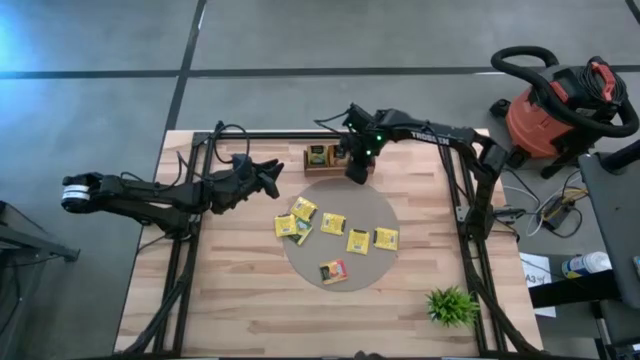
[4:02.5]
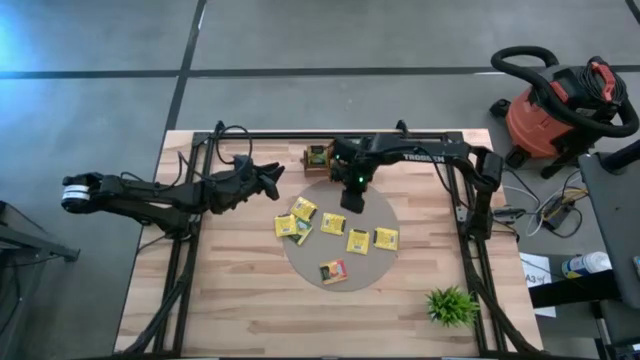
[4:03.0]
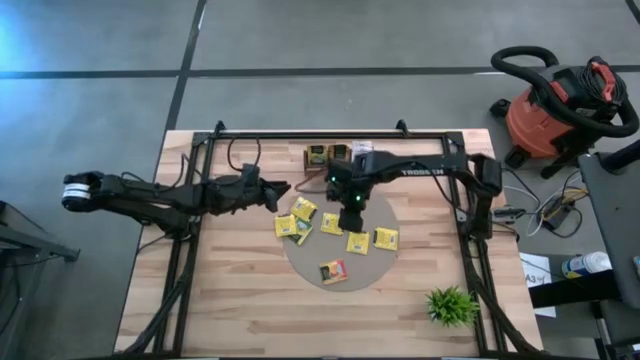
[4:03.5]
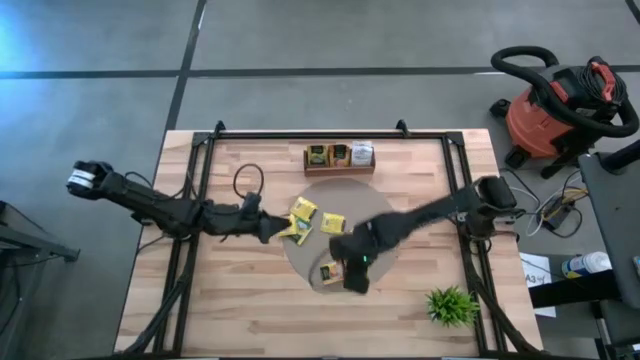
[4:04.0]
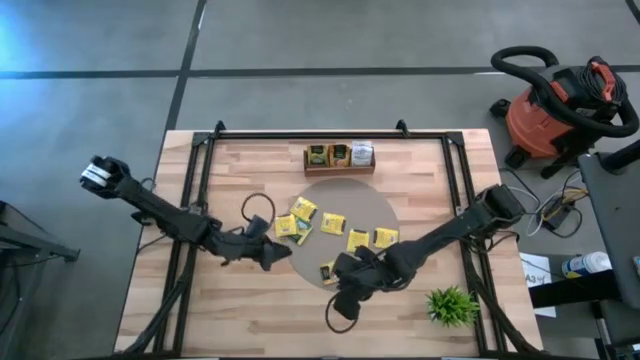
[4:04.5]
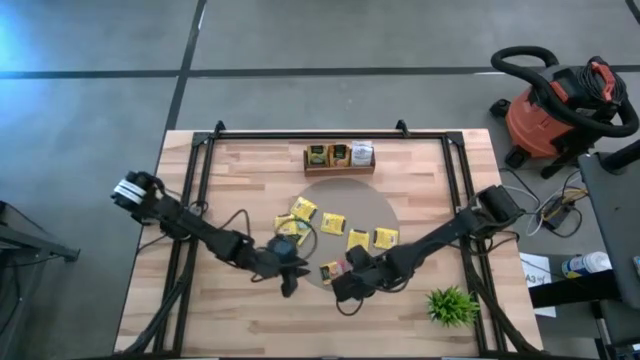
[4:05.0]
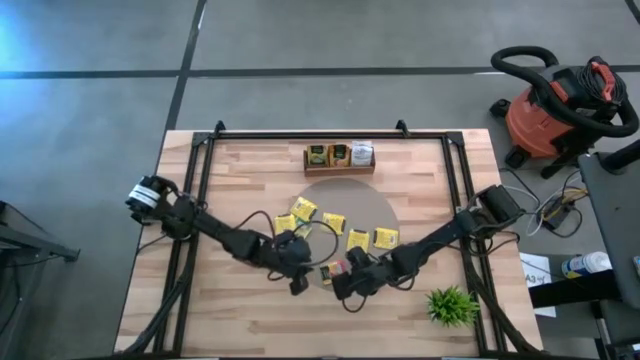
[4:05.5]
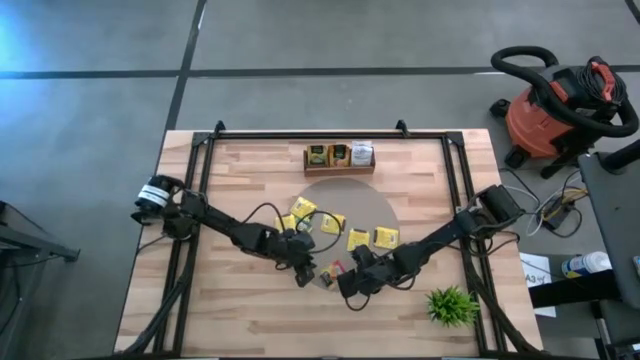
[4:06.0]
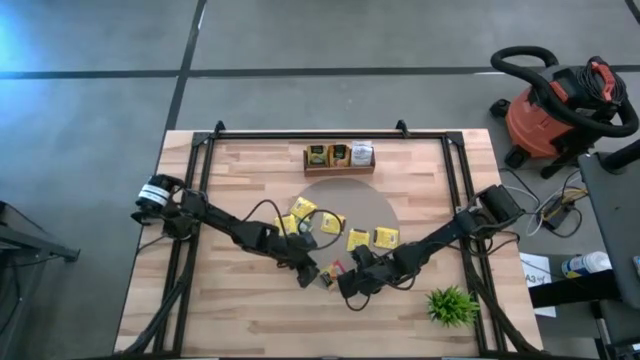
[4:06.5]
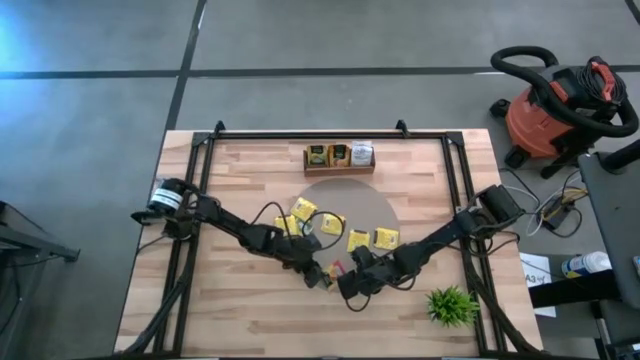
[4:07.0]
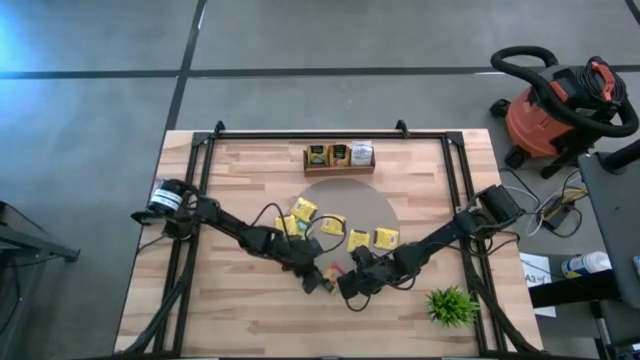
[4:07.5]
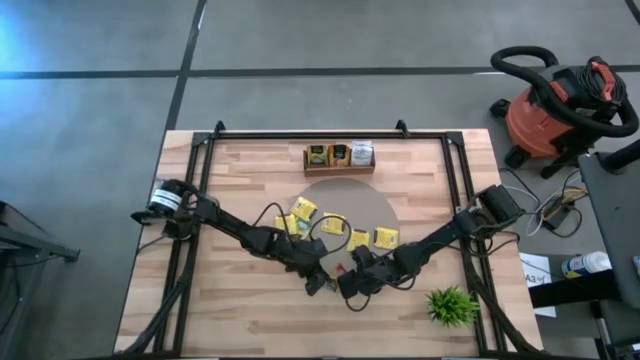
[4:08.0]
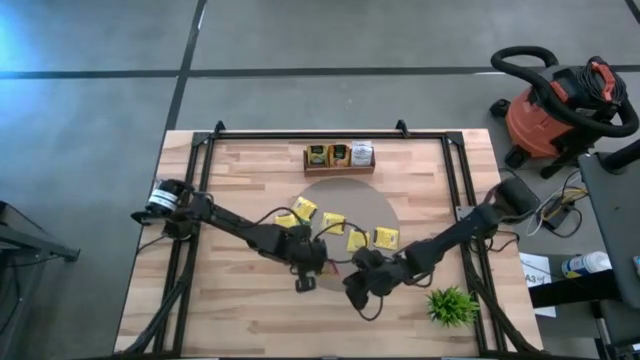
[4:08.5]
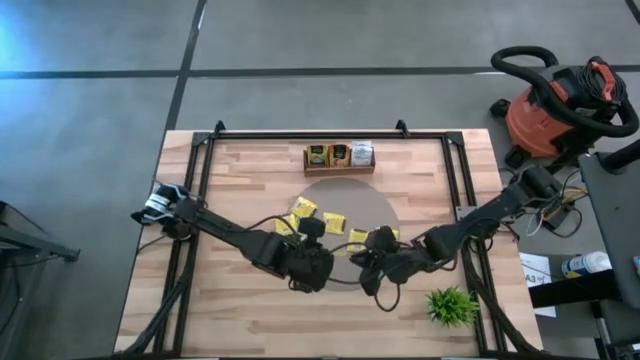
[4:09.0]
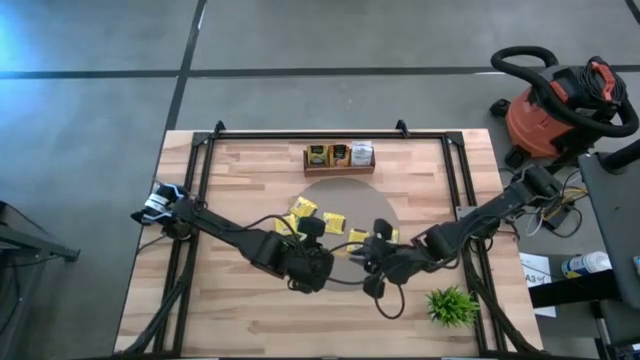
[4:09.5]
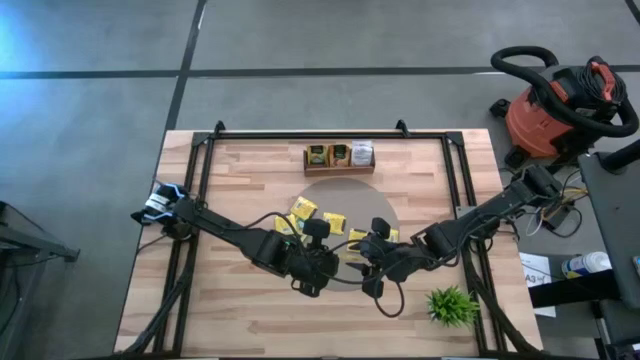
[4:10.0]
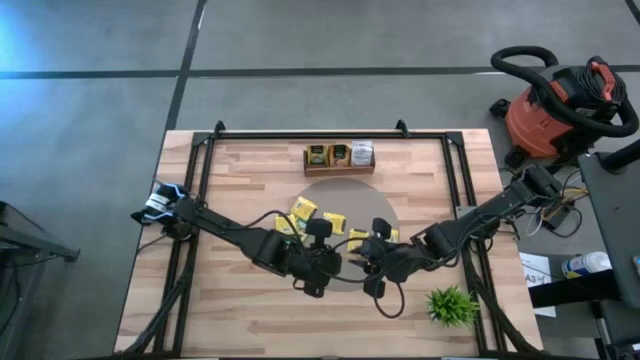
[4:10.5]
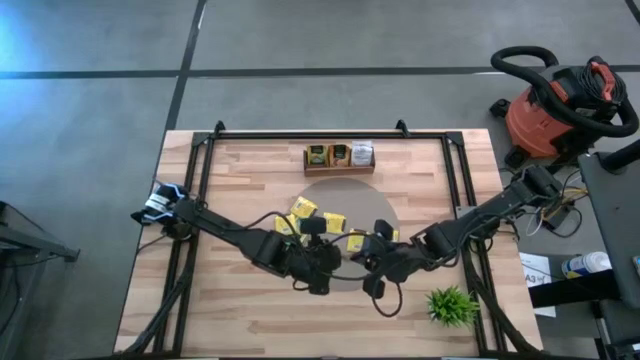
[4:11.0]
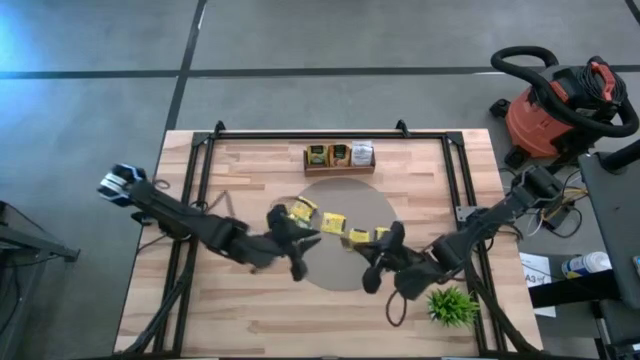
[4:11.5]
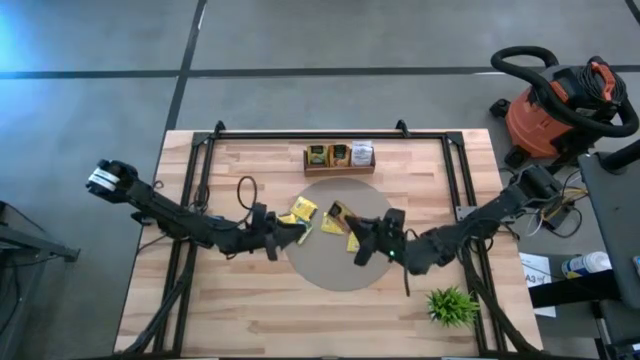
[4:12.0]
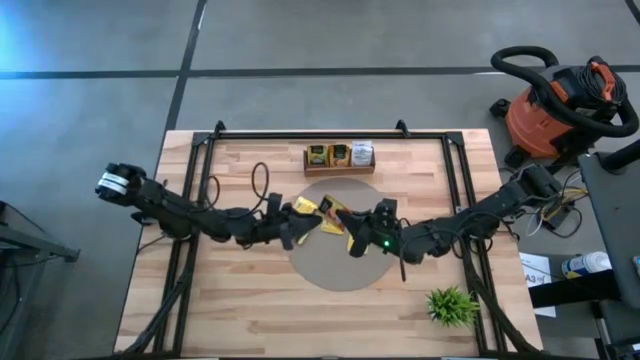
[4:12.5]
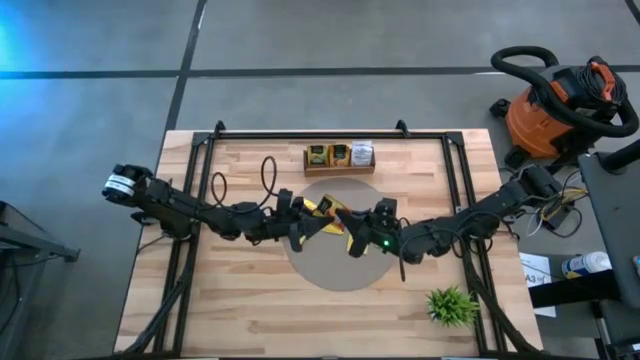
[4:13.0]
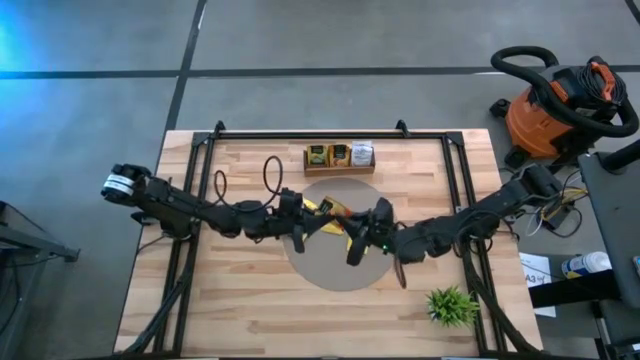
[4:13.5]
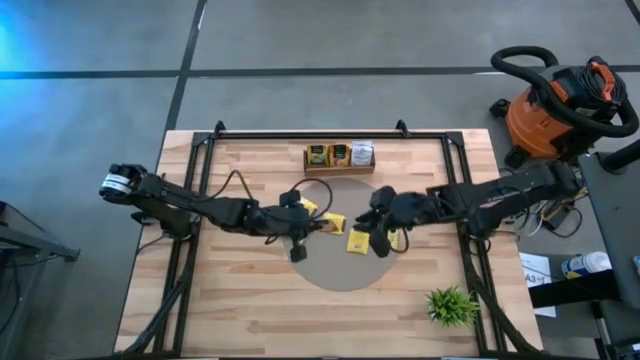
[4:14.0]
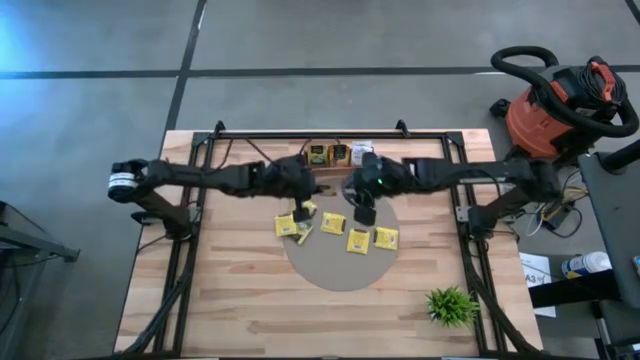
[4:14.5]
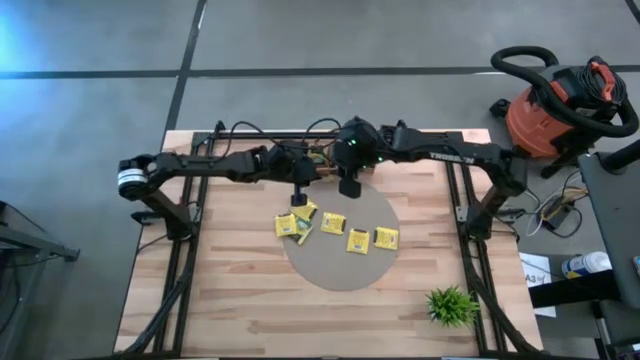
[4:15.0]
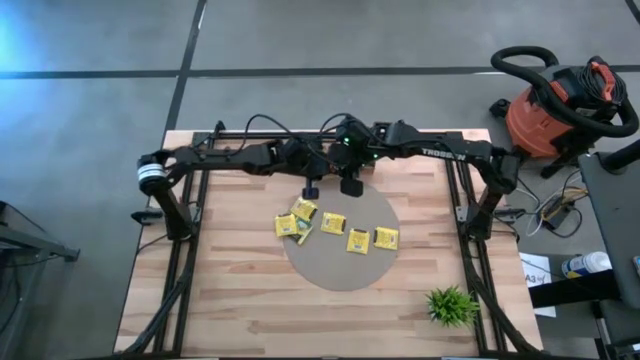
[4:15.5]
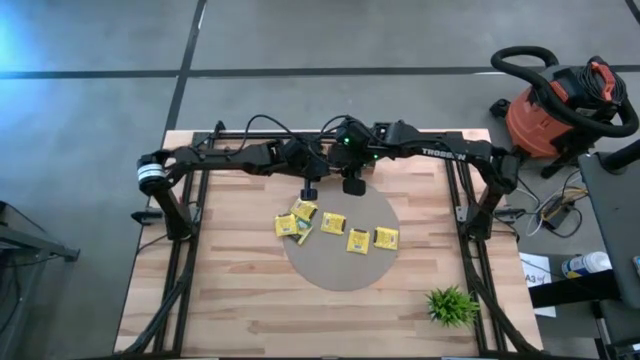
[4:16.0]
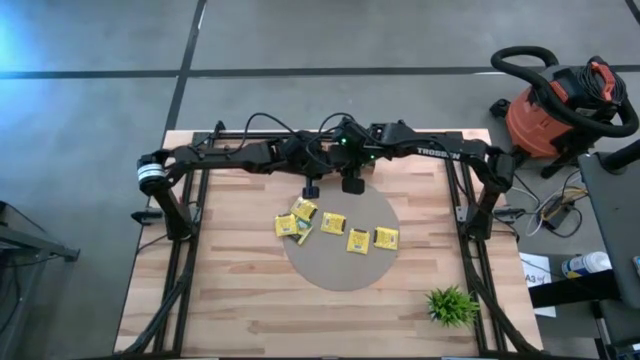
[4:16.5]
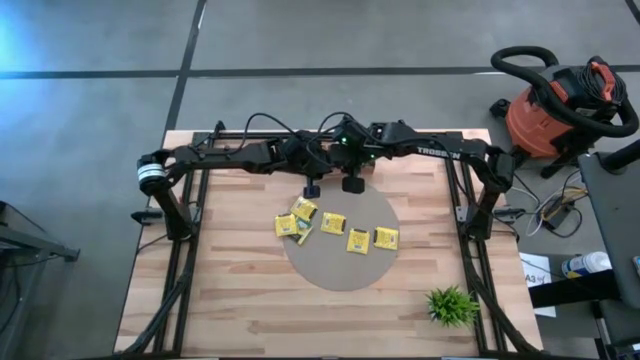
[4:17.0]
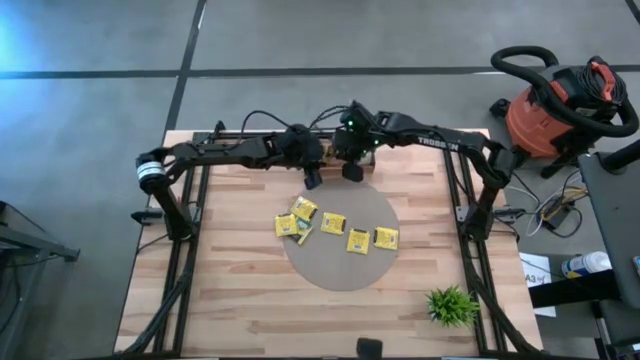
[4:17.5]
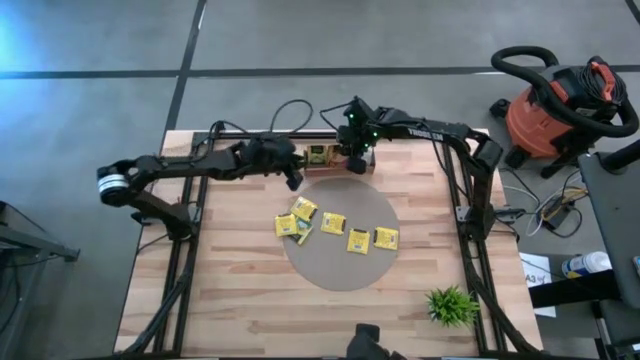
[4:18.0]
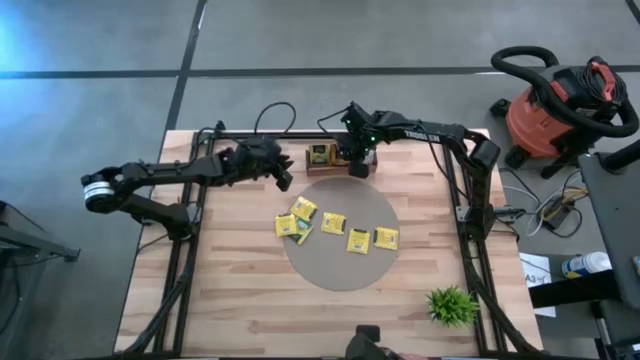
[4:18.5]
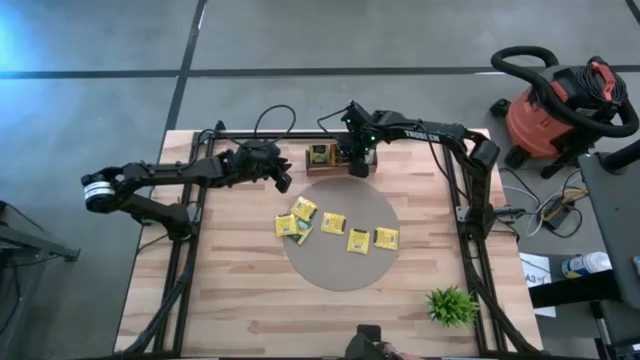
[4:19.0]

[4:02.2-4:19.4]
Task: Pick & Place Tea
Put the orange tea bag into the middle compartment of the wooden organizer

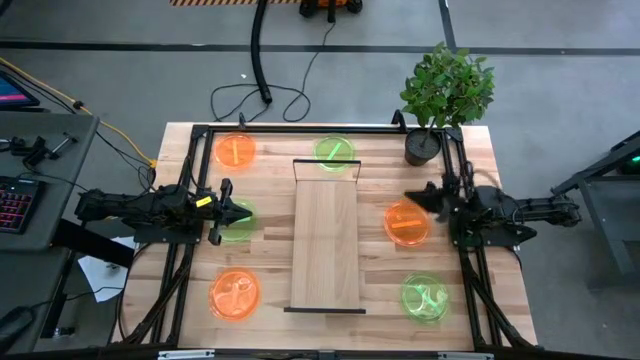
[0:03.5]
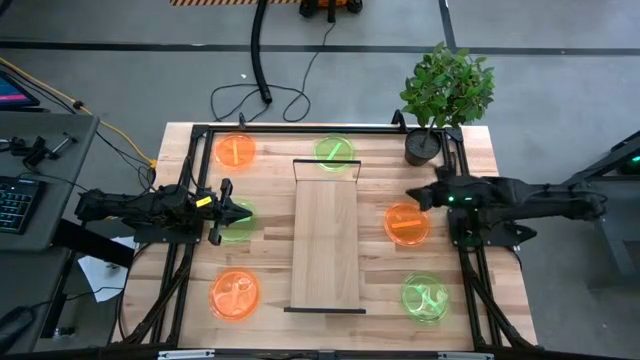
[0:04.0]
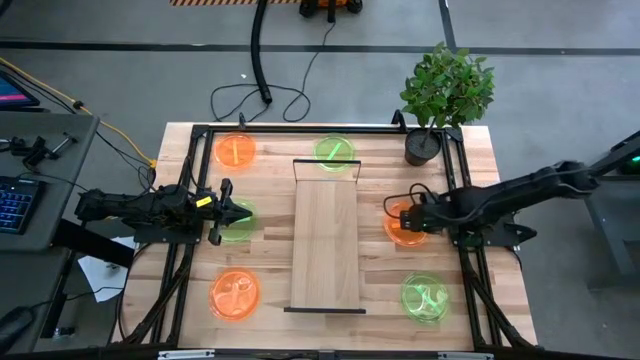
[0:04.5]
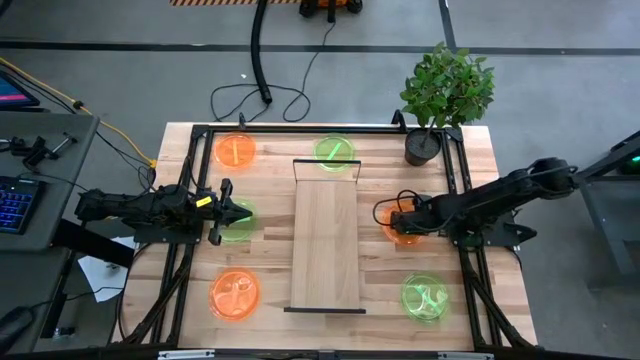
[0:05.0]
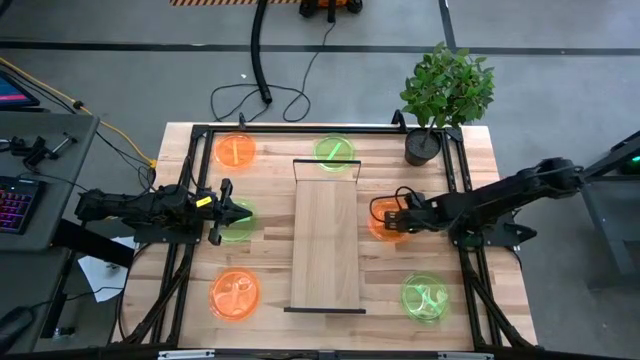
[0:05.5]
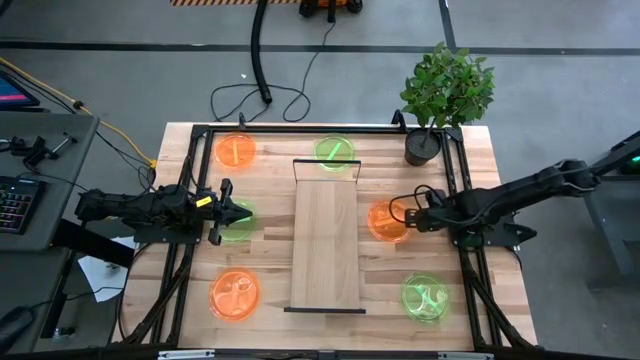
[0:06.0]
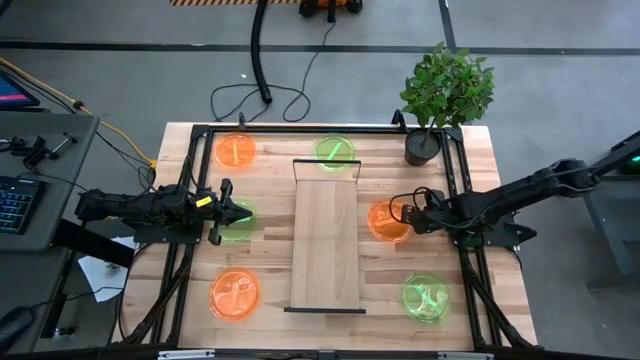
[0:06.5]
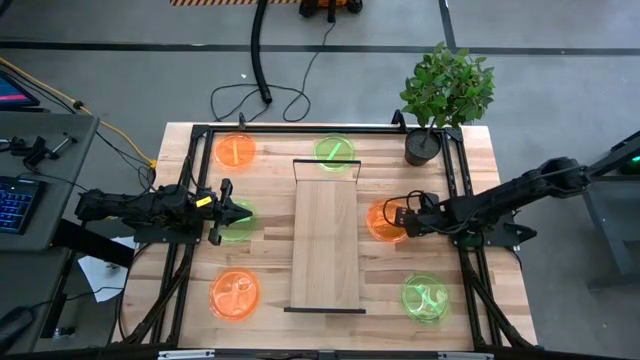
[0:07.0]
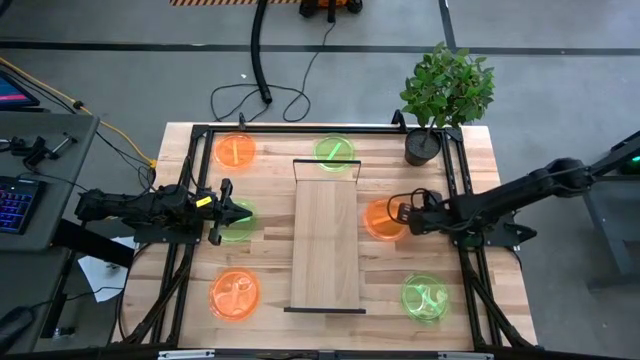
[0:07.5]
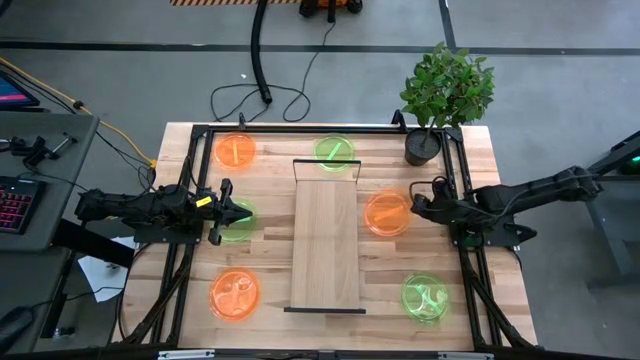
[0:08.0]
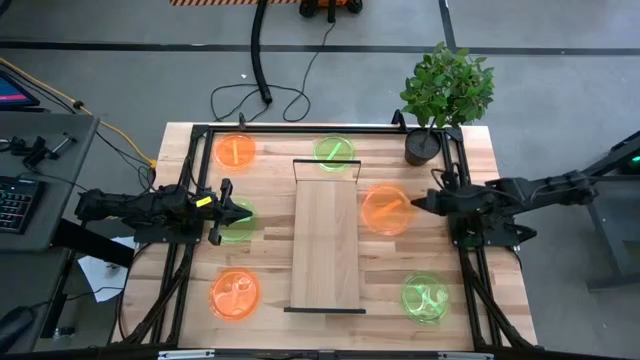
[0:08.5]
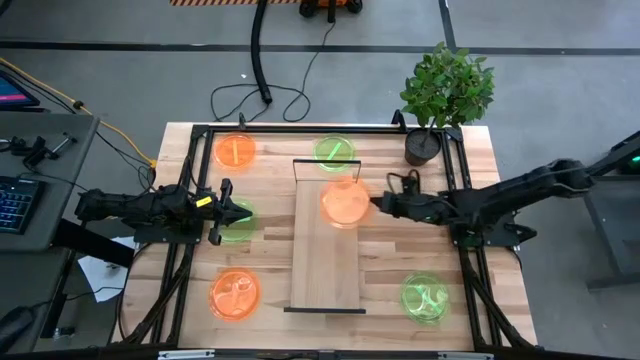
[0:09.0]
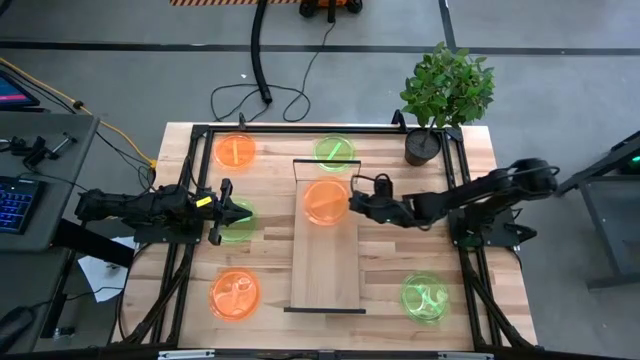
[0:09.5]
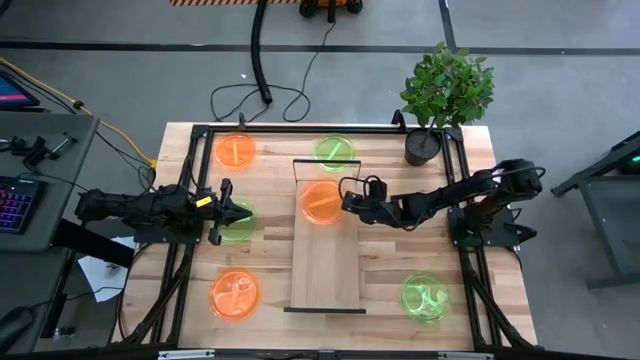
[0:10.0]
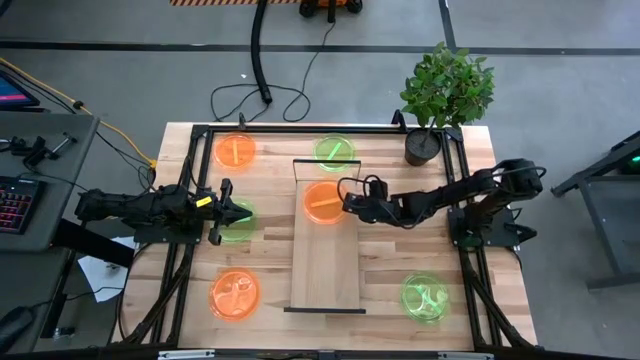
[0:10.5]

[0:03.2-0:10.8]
Task: Place and stack plates onto a shelf
Put the middle right orange plate on the shelf
